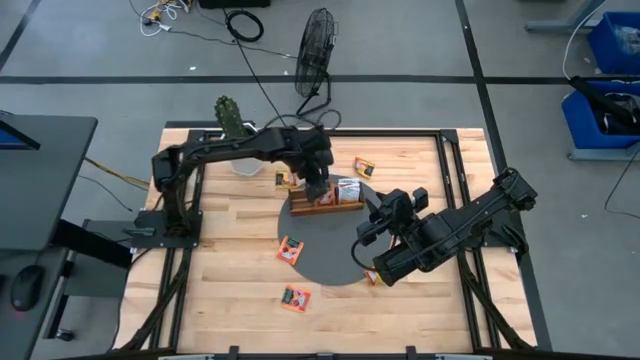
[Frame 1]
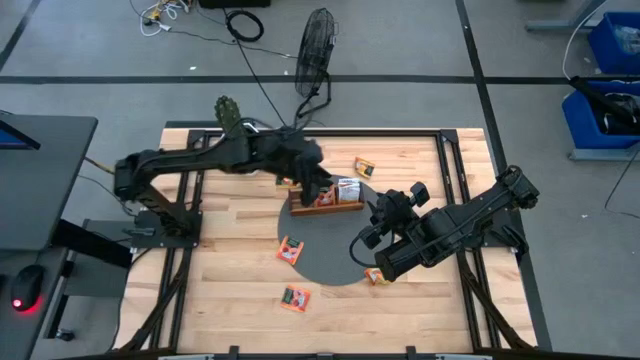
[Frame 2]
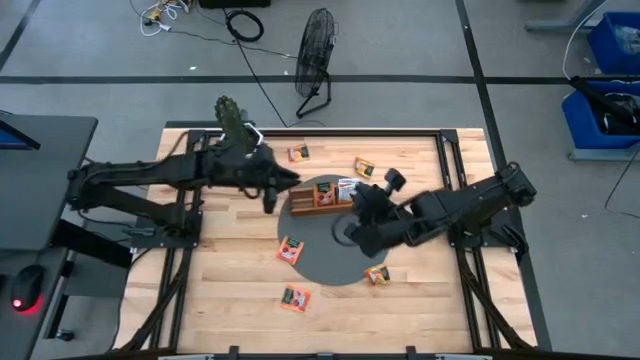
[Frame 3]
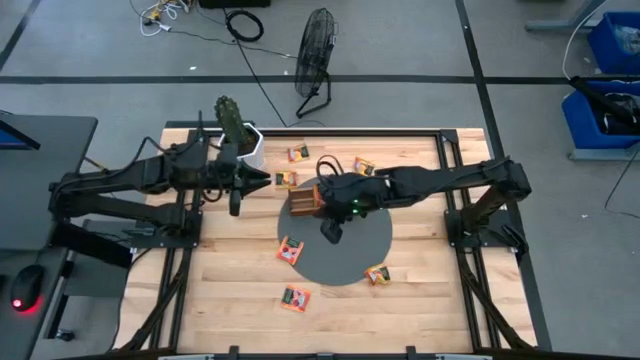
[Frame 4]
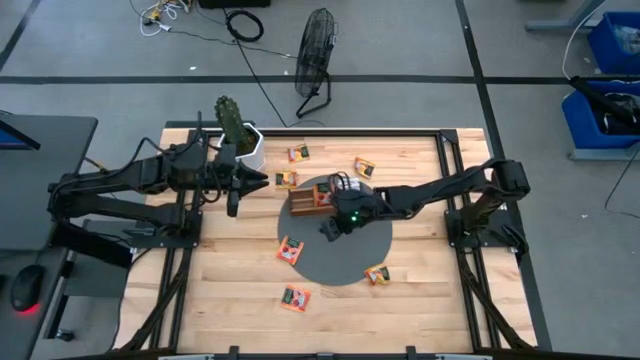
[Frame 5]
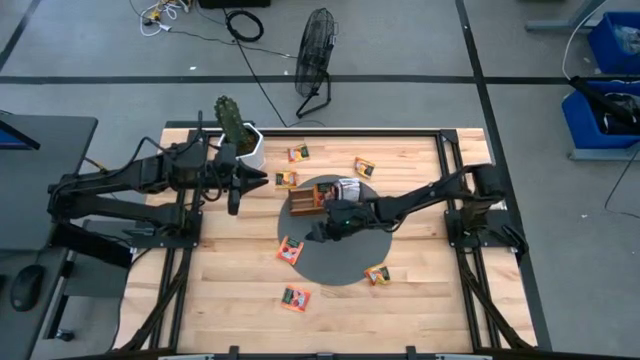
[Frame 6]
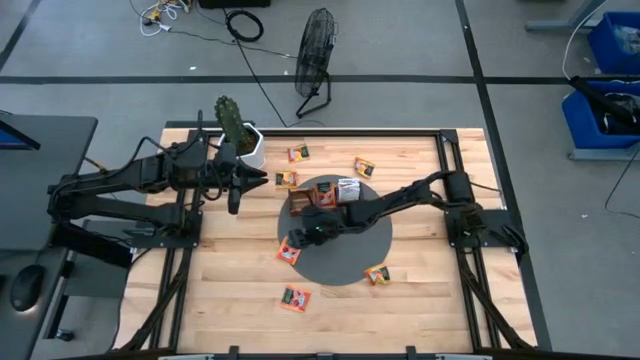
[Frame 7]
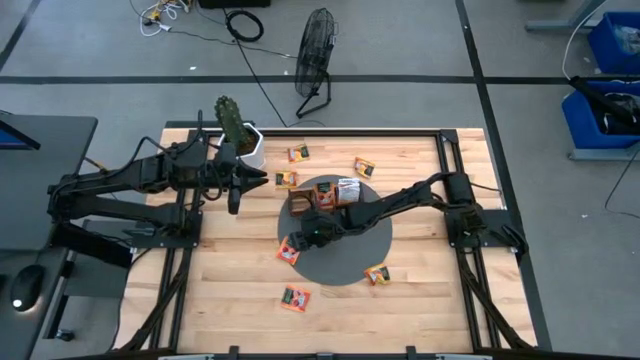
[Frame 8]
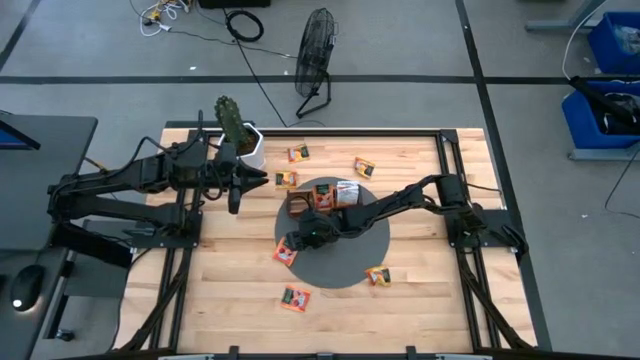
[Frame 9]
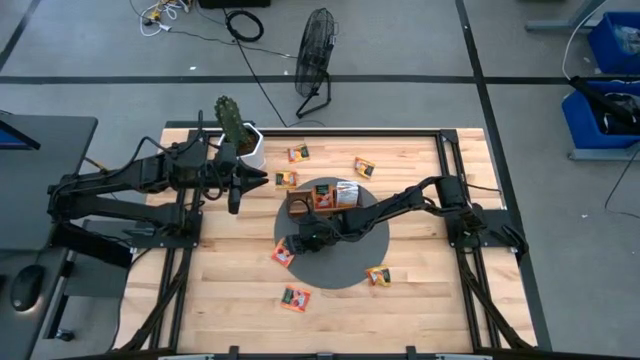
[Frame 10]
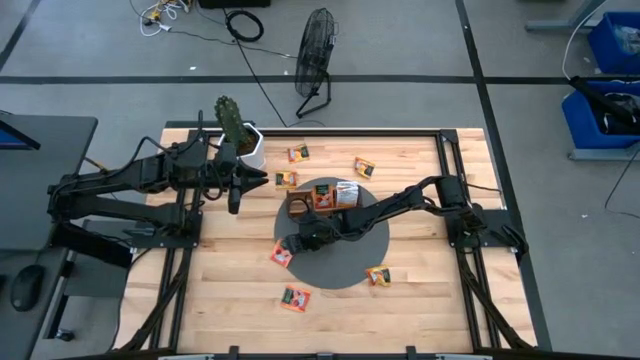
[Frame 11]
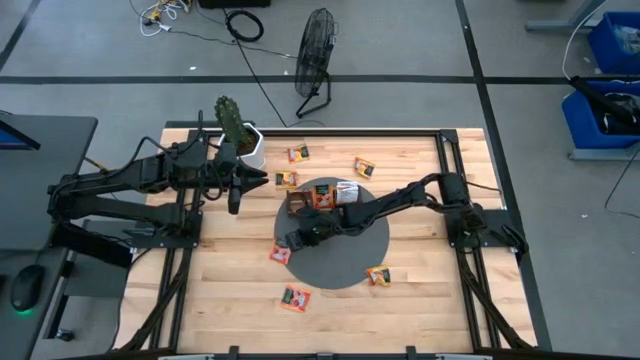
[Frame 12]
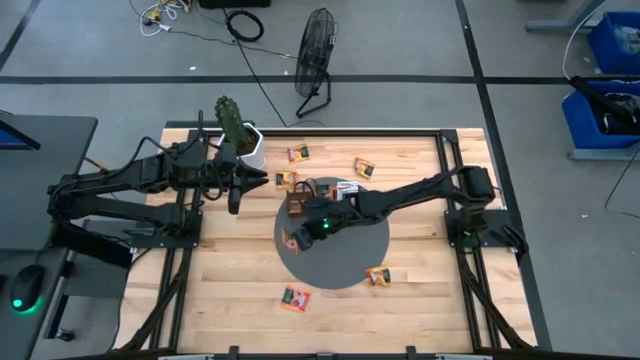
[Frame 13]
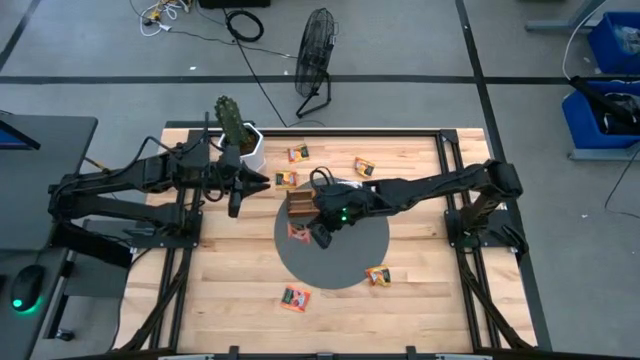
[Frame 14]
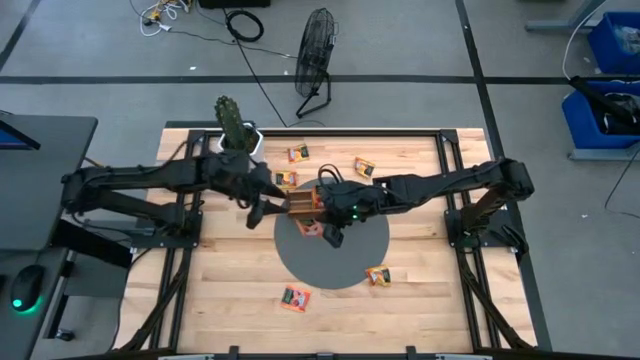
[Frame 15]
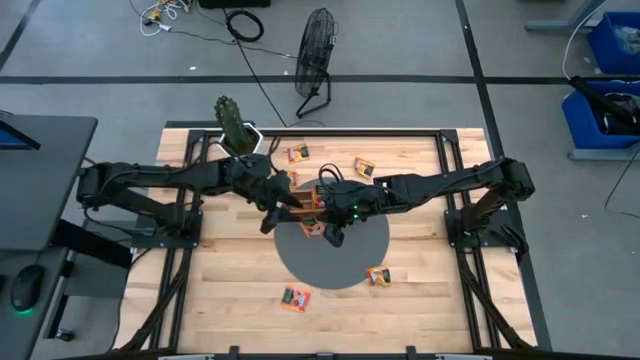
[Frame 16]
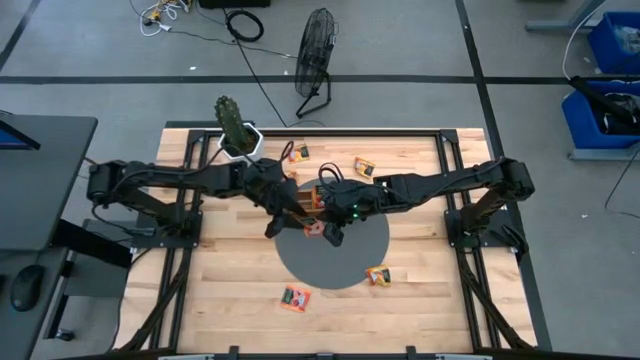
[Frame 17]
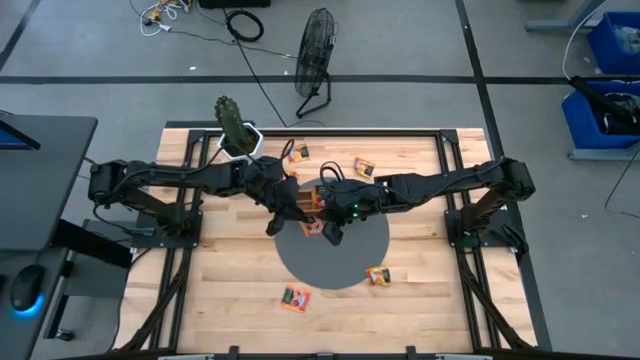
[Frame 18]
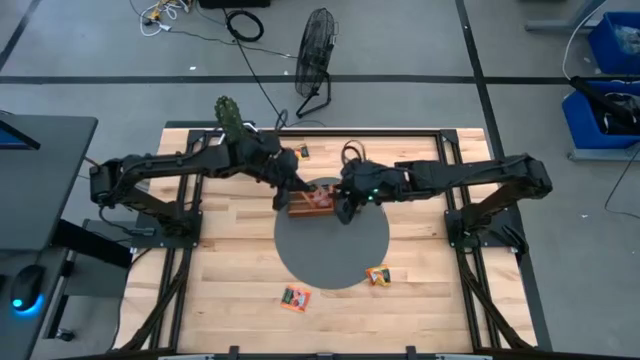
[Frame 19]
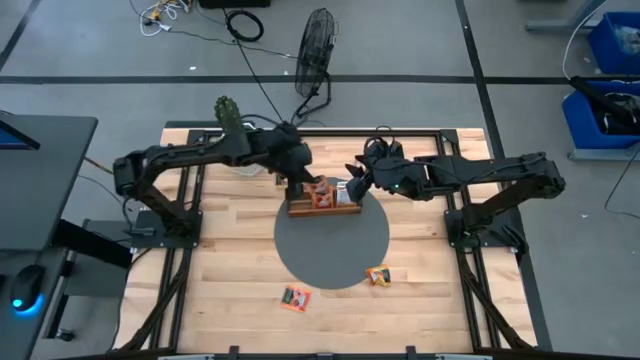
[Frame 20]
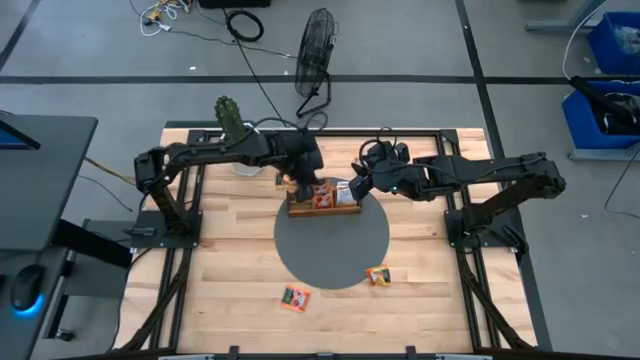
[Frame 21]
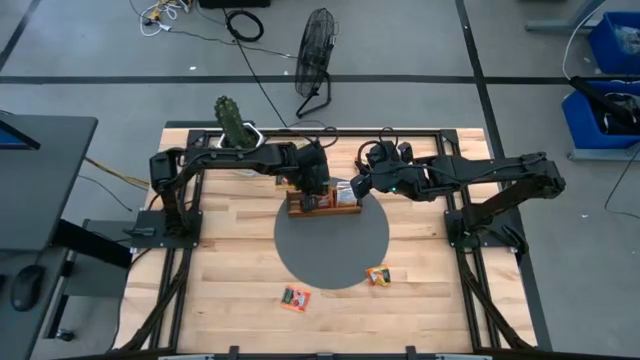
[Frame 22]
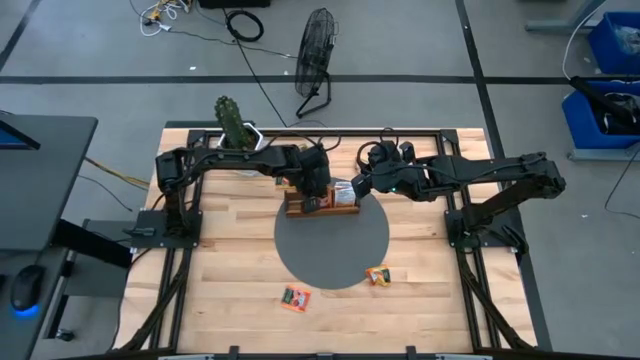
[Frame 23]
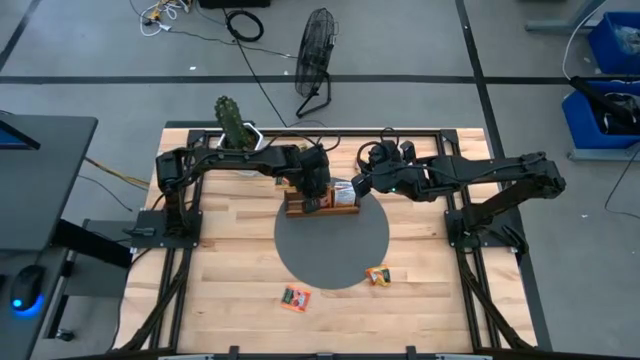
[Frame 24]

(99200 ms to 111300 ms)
Task: Pick & Place Tea
Put the pink tea bag into the middle section of the wooden organizer

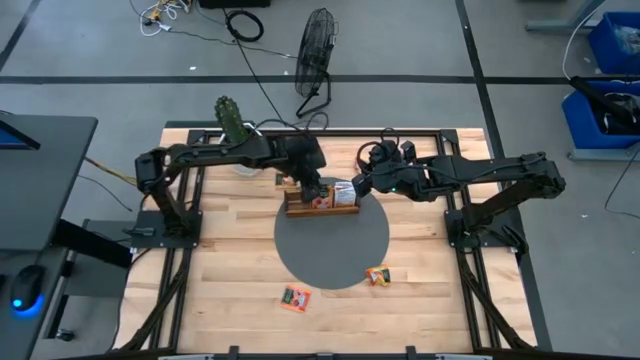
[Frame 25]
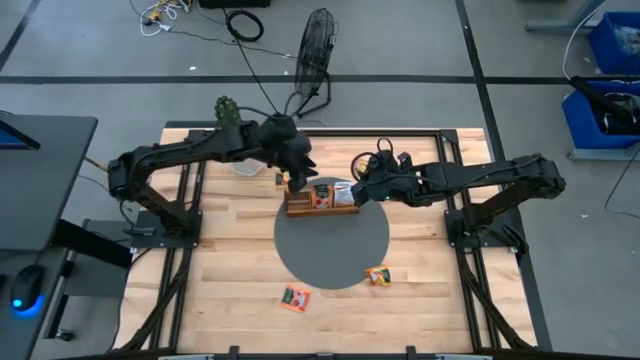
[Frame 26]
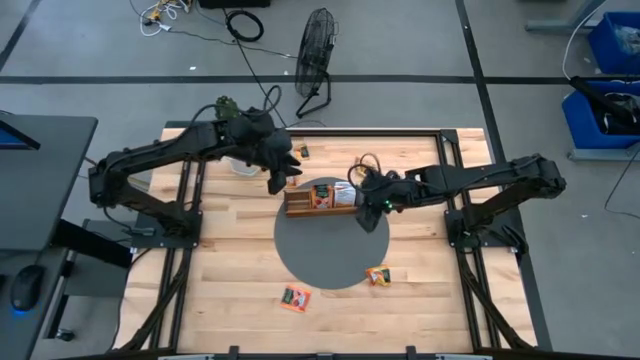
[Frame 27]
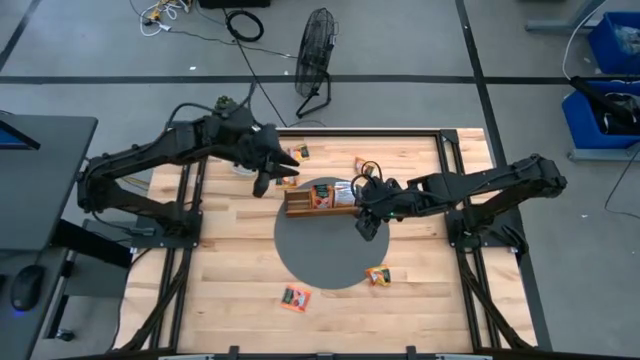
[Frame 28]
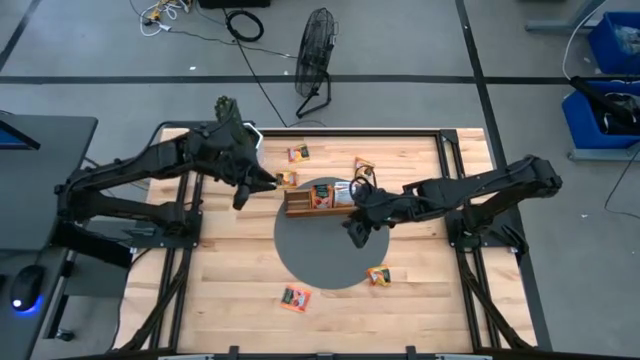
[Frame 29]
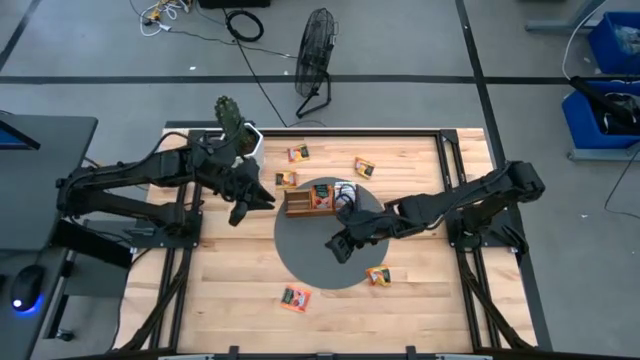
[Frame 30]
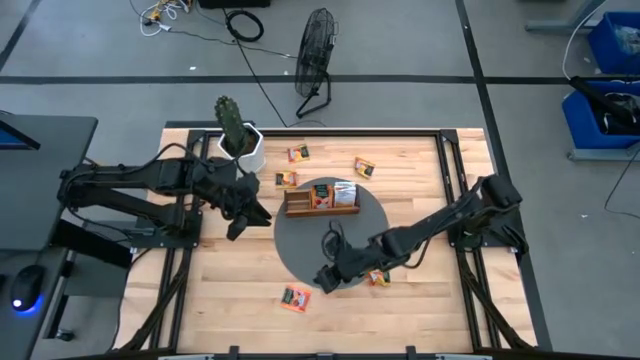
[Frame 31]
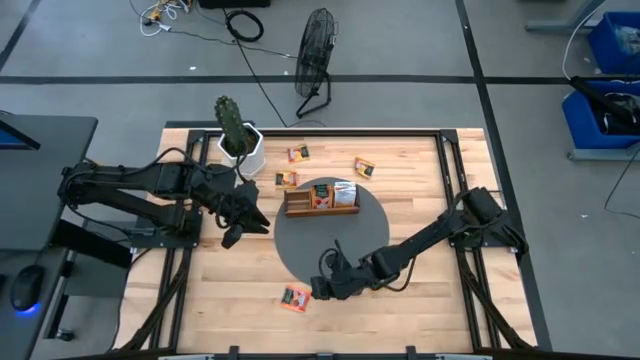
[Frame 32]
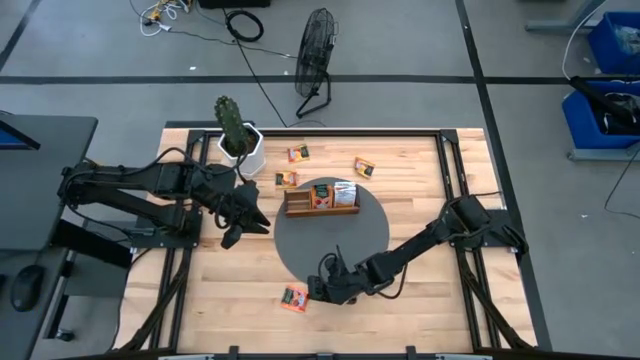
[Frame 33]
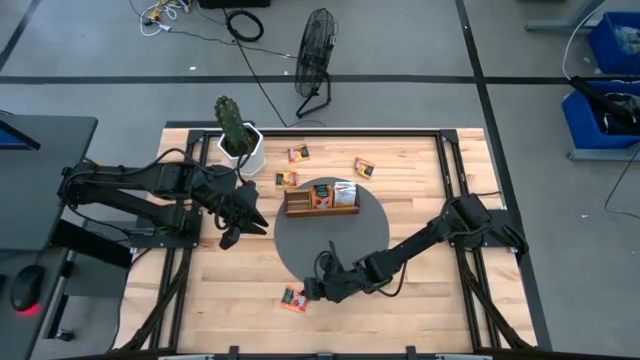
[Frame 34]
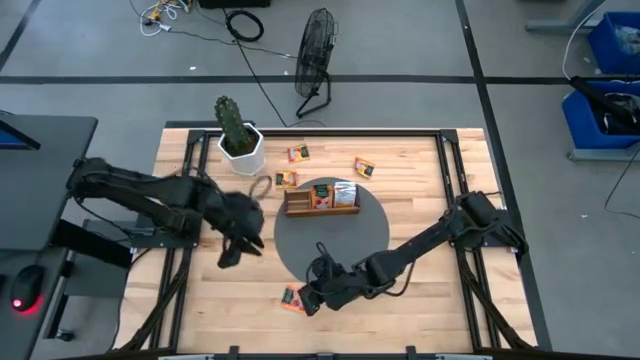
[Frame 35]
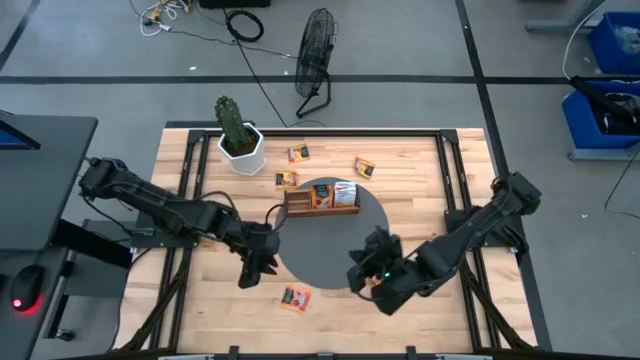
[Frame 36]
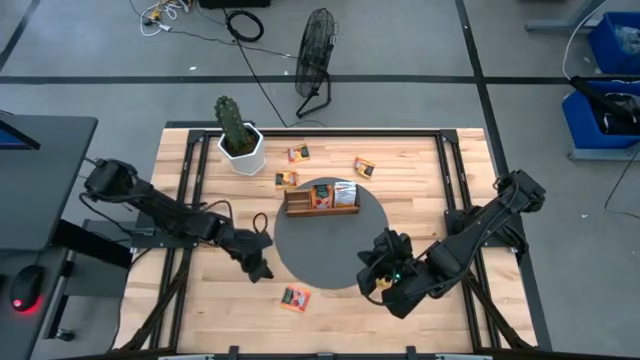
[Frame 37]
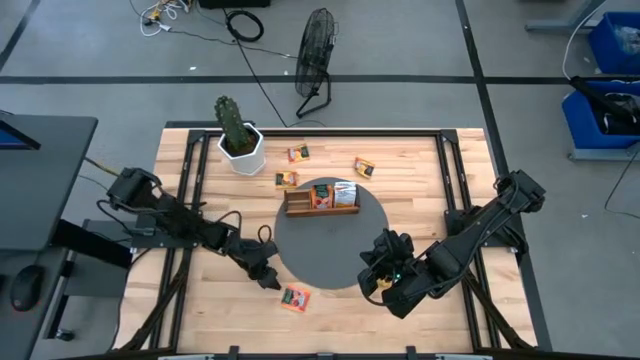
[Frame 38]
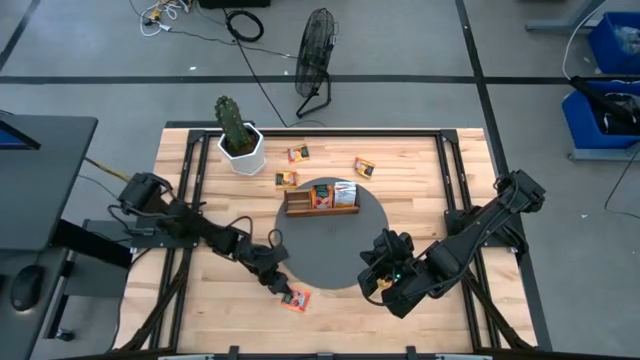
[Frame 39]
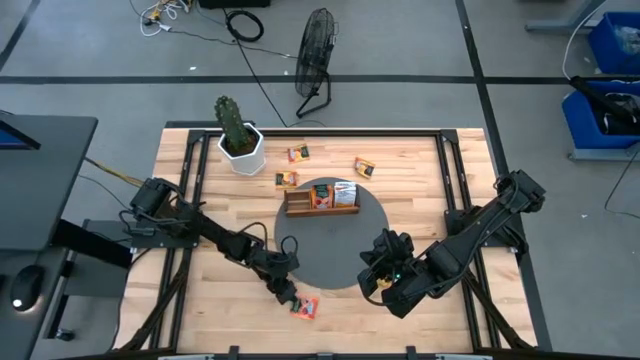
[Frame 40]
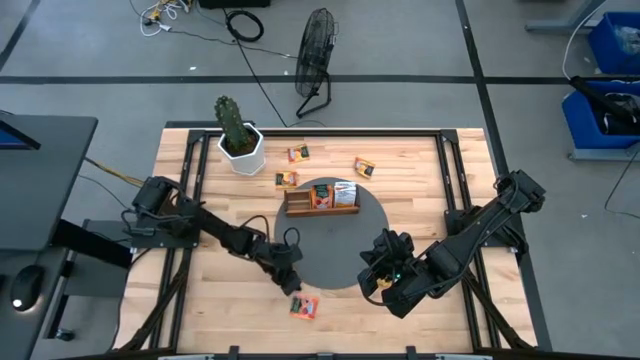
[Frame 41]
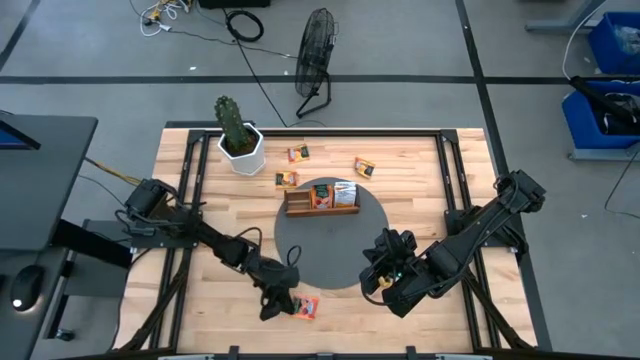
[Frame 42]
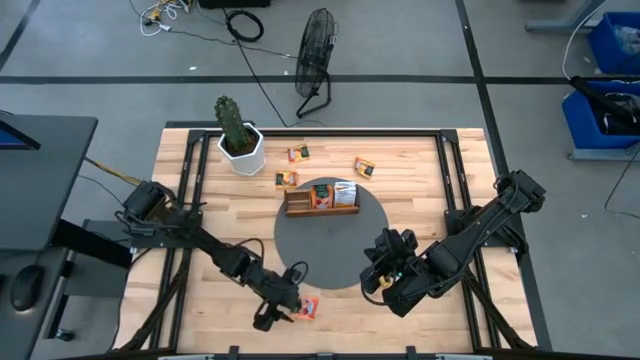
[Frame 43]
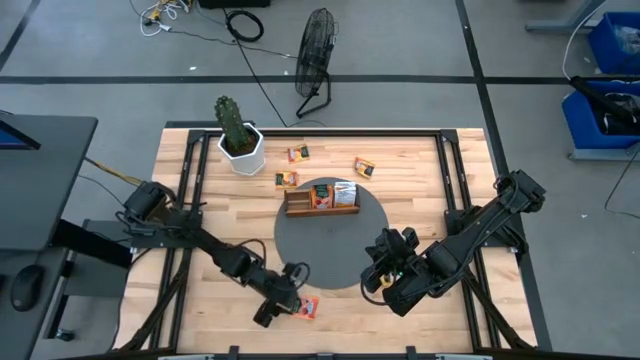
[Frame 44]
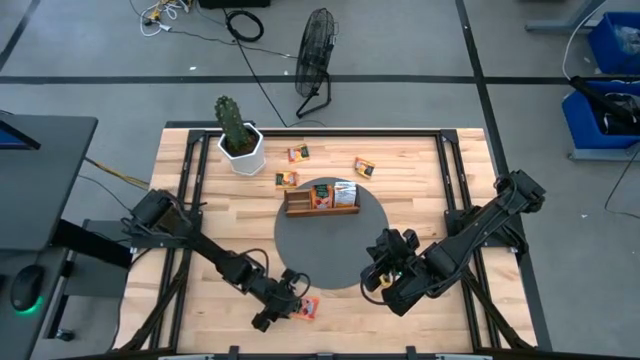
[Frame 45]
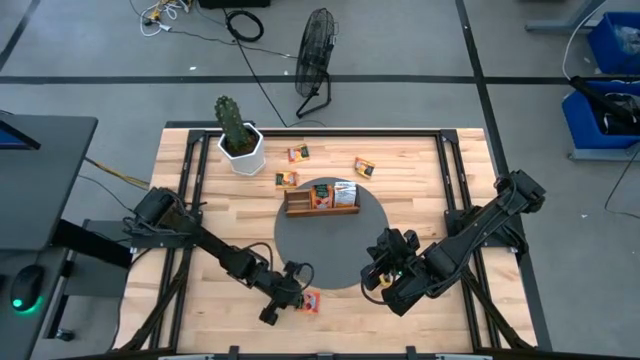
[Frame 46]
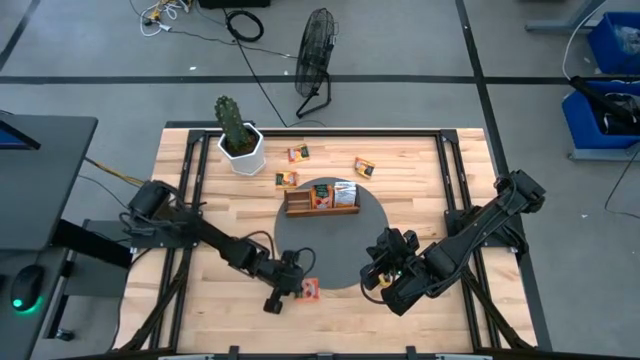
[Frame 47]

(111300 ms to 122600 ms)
Put the pink tea bag into the middle section of the wooden organizer
